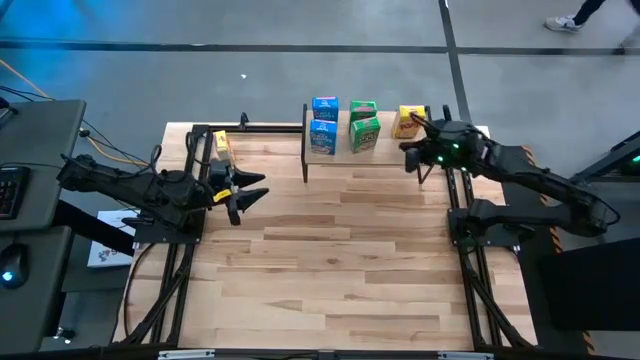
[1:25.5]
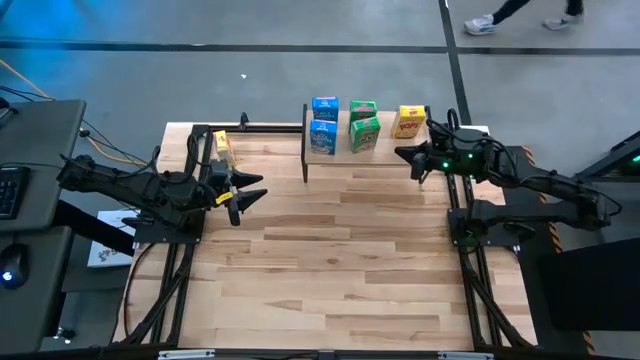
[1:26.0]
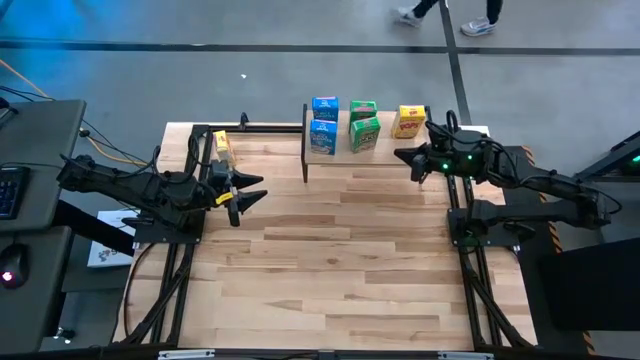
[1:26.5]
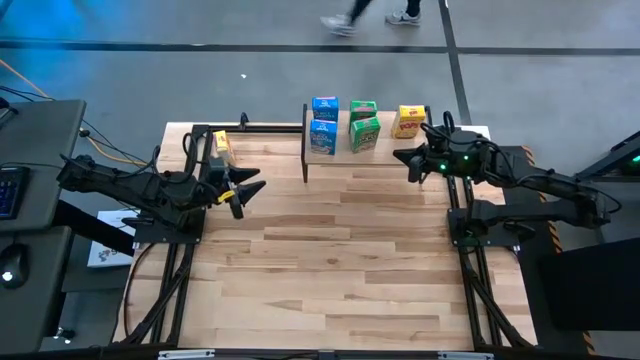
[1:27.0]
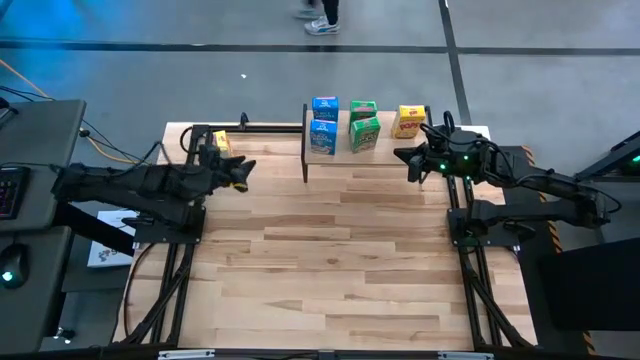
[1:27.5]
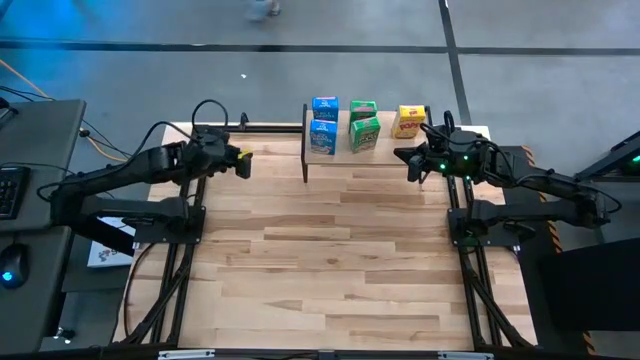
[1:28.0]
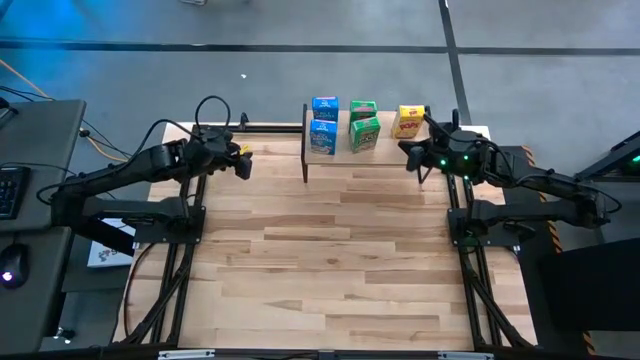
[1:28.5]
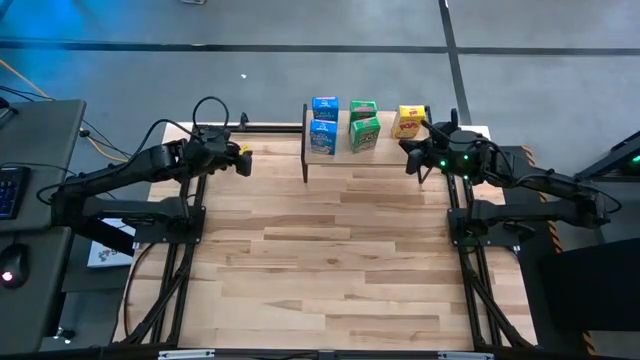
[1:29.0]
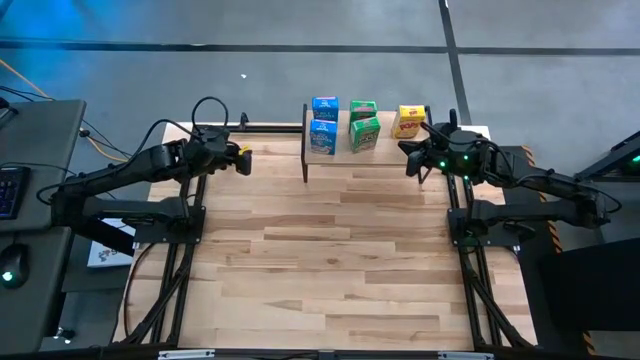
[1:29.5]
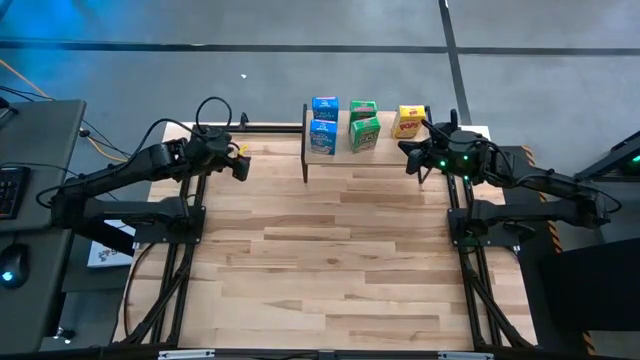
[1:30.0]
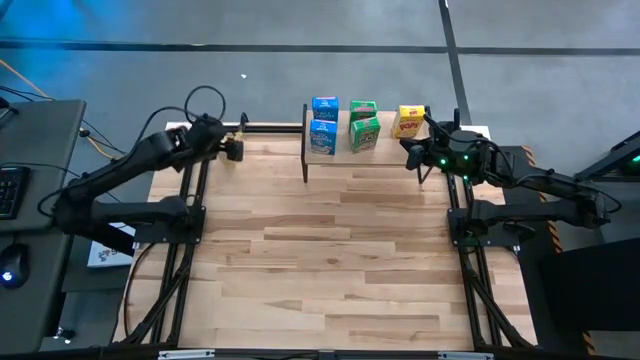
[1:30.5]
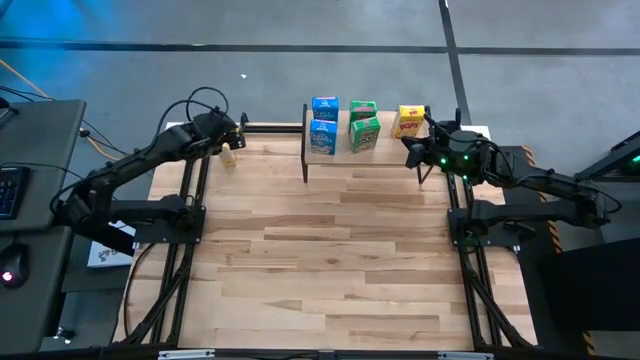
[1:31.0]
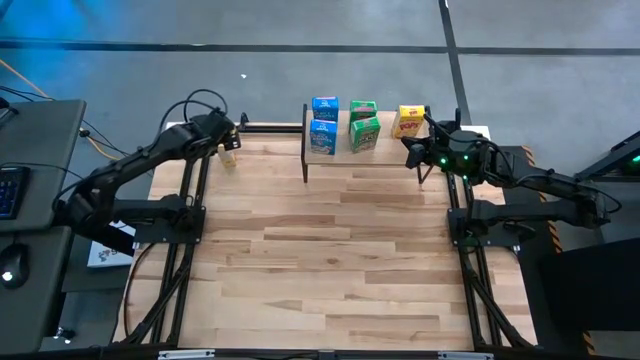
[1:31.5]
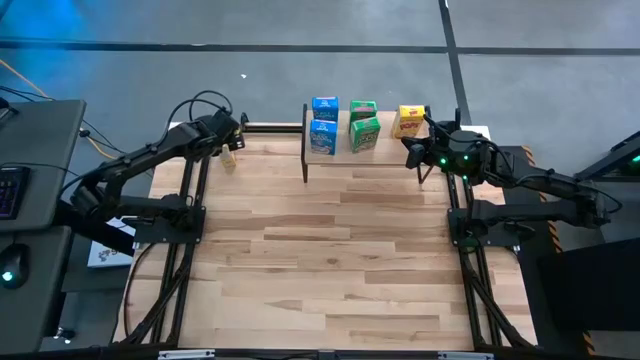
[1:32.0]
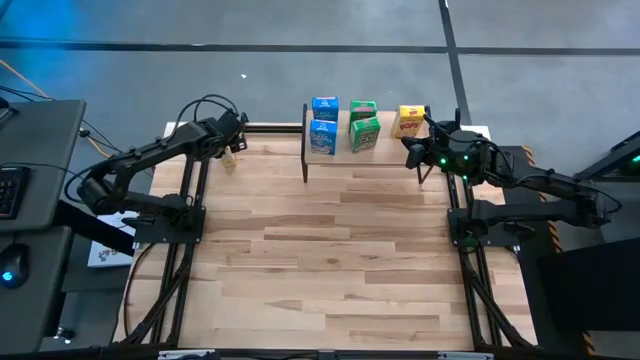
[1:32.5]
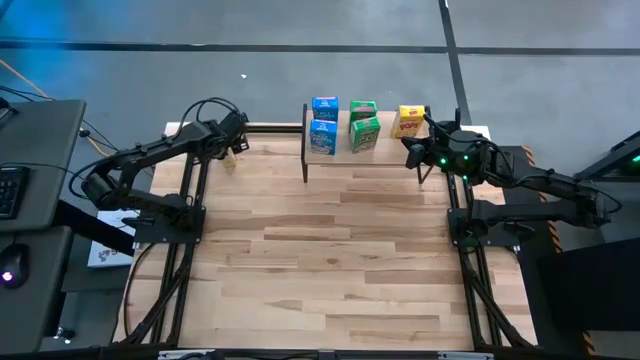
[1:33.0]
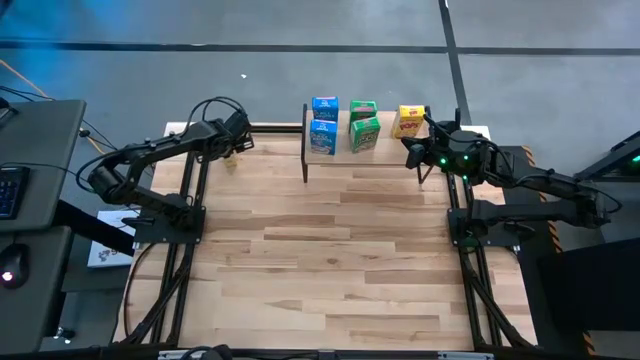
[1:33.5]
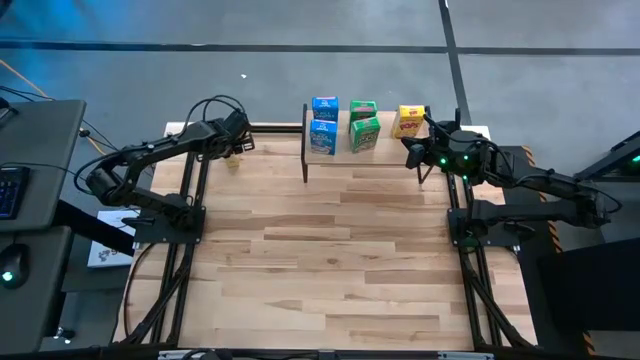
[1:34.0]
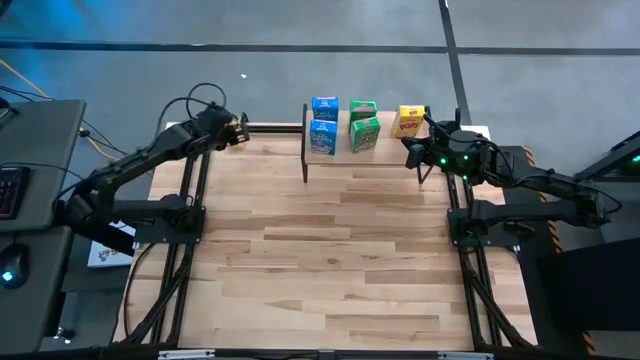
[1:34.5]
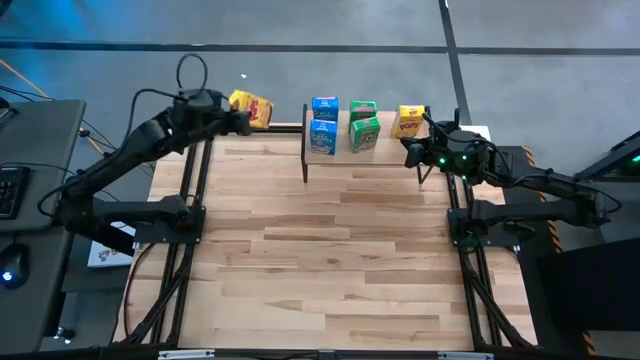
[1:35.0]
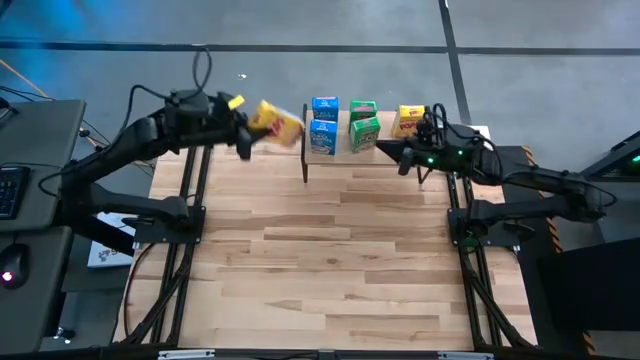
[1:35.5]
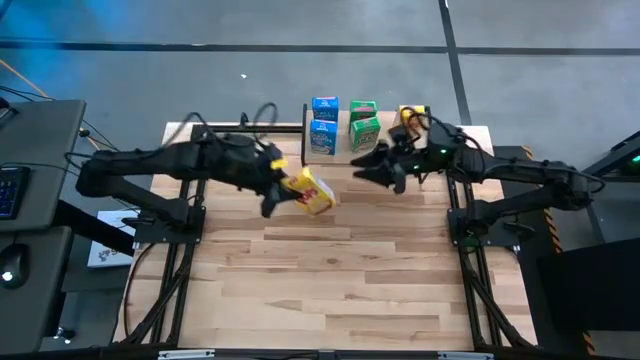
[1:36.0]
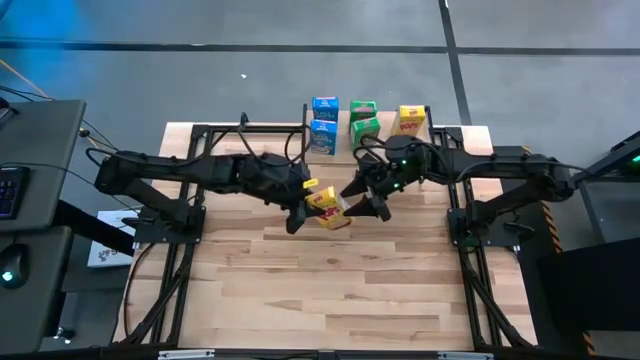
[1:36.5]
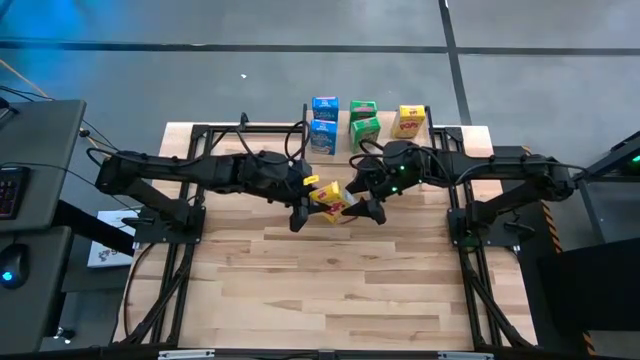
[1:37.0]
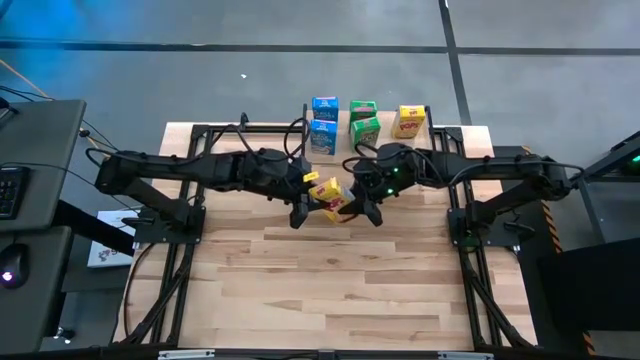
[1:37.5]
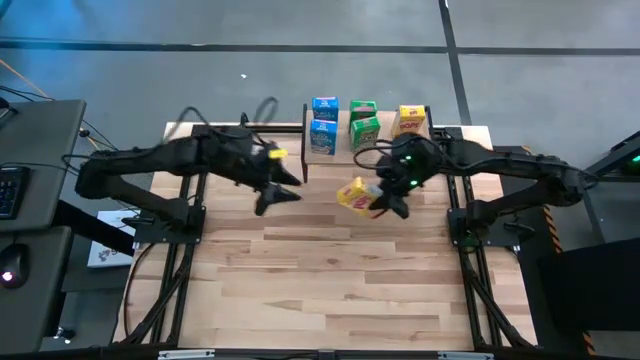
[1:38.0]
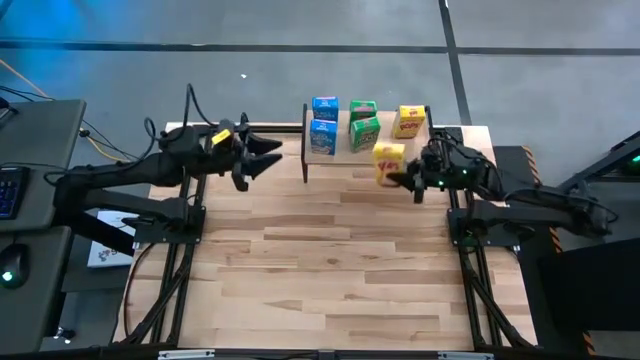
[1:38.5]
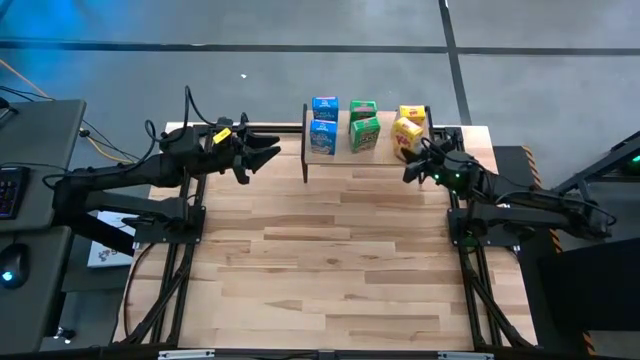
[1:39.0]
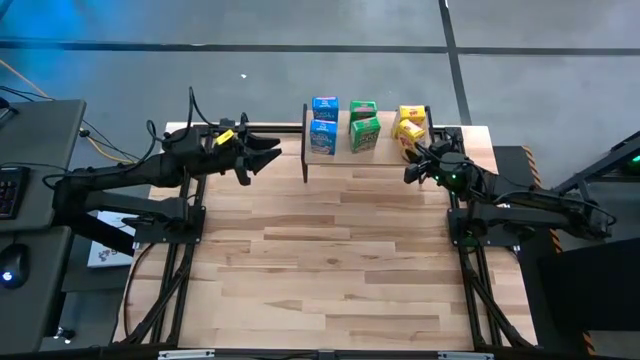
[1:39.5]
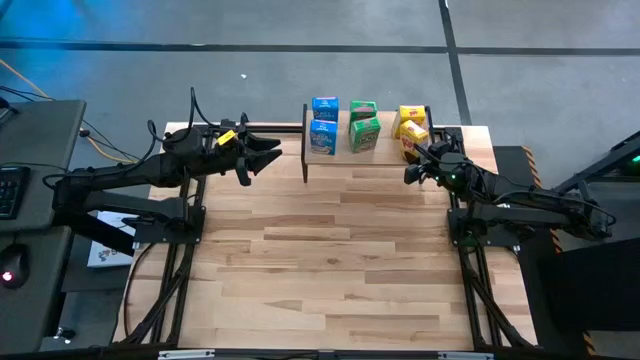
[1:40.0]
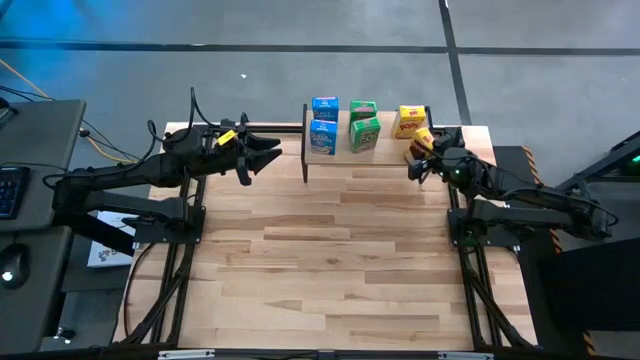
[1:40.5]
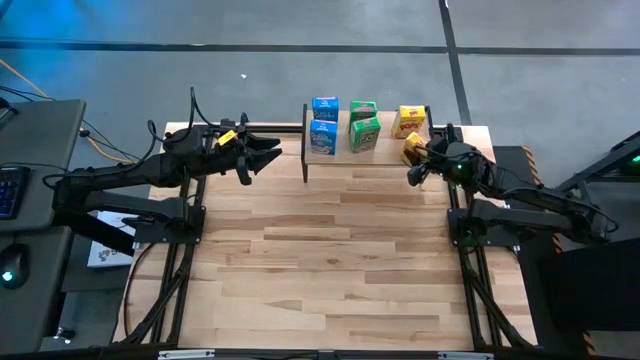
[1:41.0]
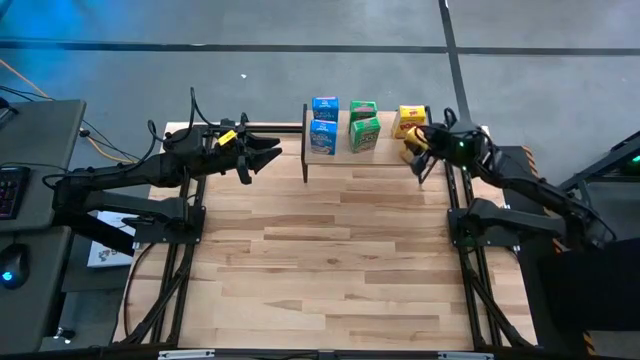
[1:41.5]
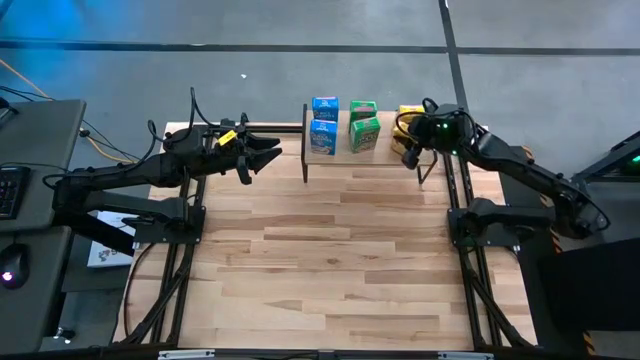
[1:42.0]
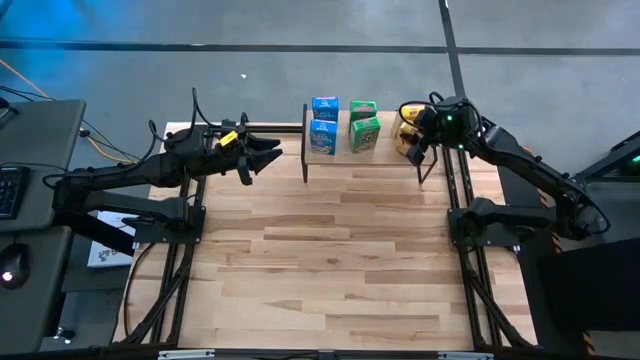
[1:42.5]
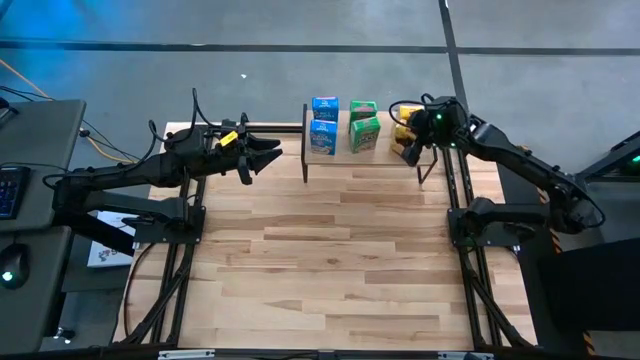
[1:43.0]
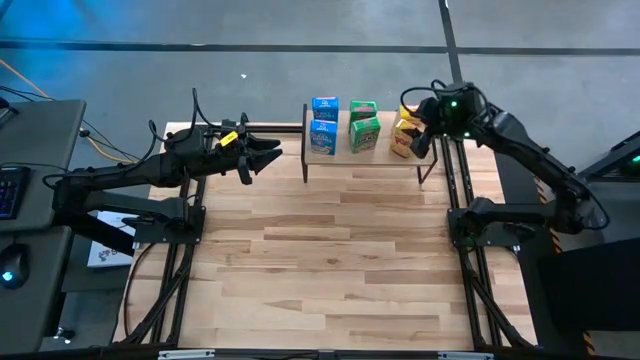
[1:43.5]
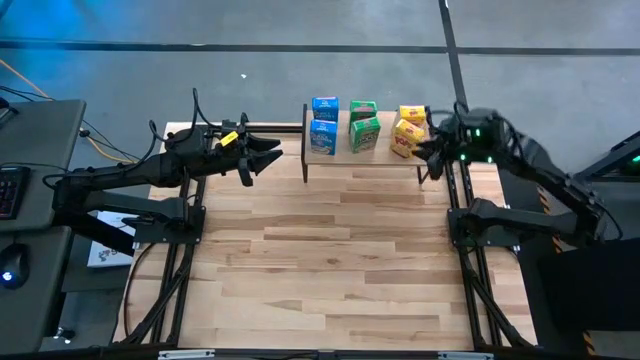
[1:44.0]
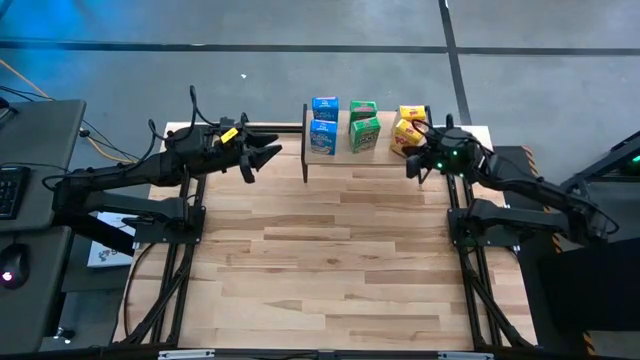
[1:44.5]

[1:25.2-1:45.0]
Task: Stack cereal on shelf
Put the yellow cereal box on the shelf

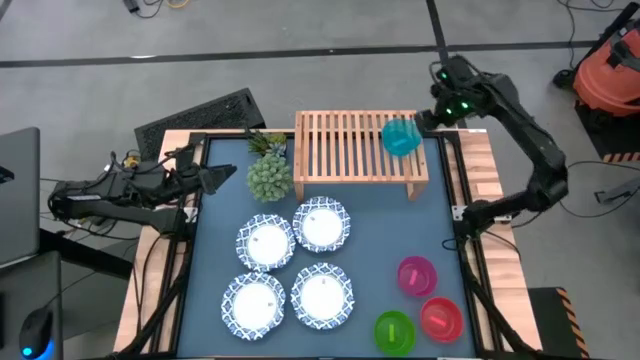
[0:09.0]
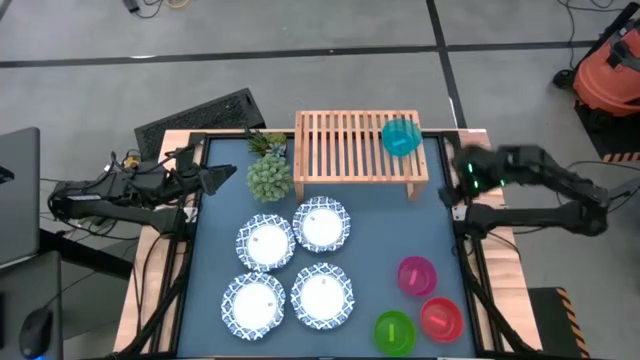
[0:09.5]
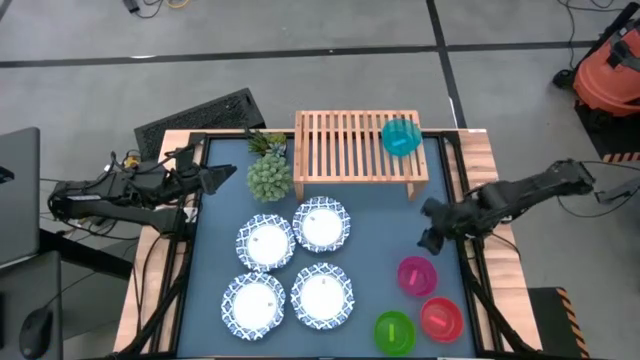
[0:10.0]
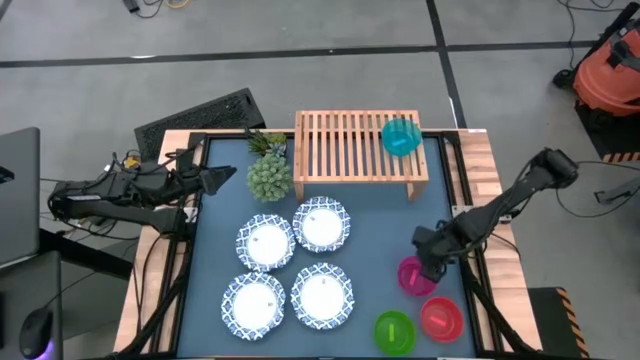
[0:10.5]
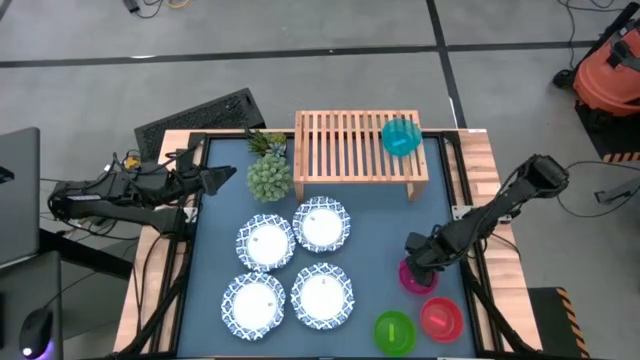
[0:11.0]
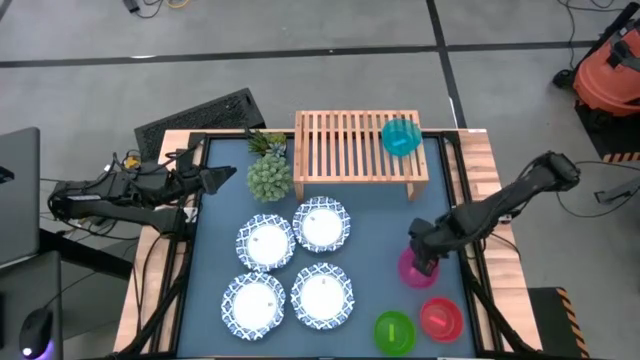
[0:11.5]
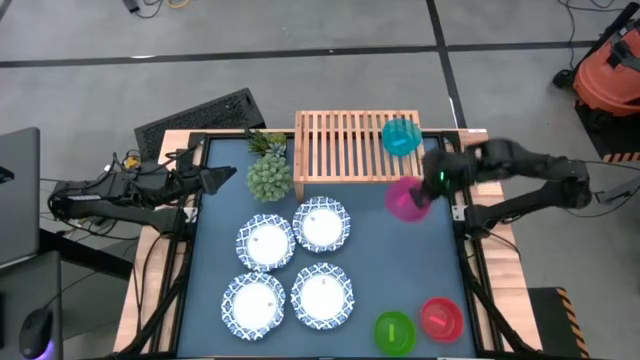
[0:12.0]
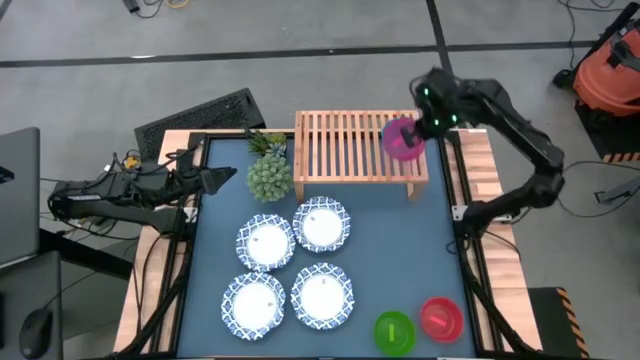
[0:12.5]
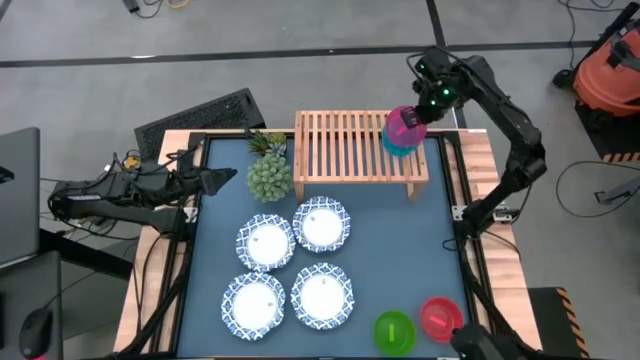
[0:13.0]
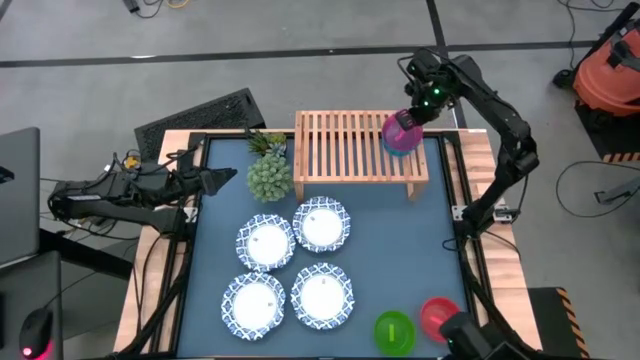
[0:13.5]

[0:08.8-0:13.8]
Task: Place and stack bowls onto a shelf
Stack the red bowl on top of the blue bowl on the shelf
